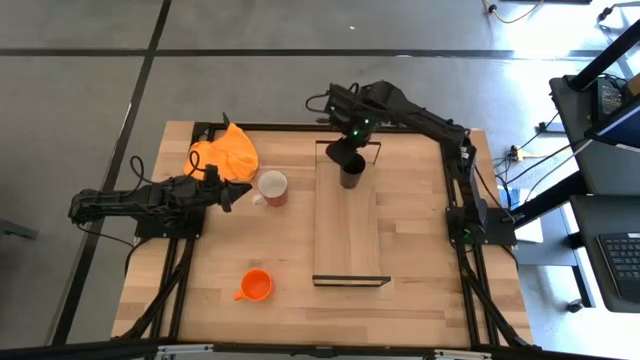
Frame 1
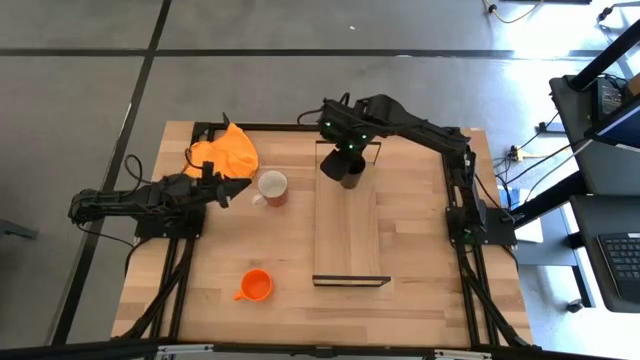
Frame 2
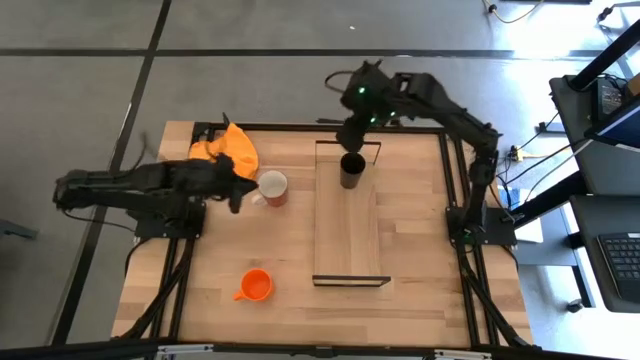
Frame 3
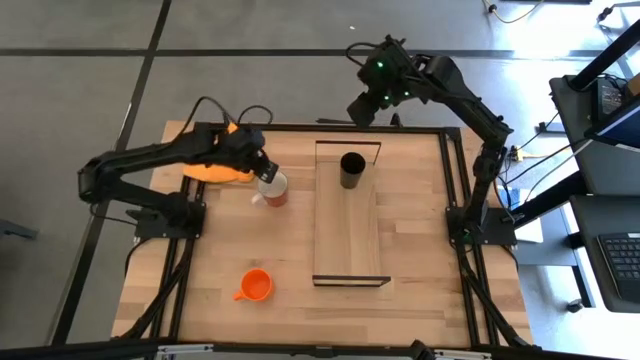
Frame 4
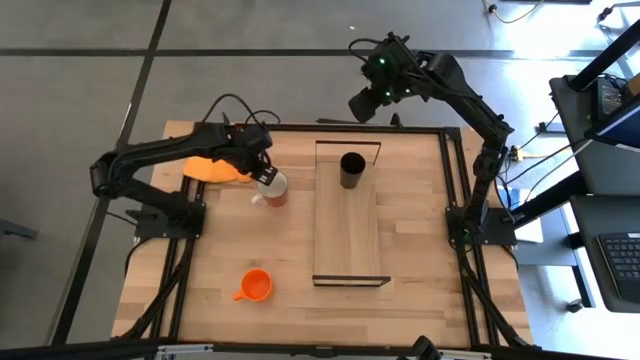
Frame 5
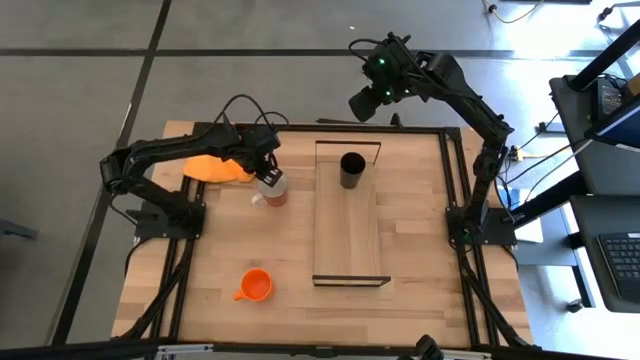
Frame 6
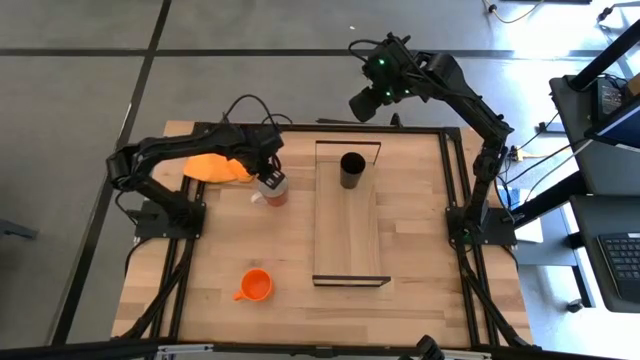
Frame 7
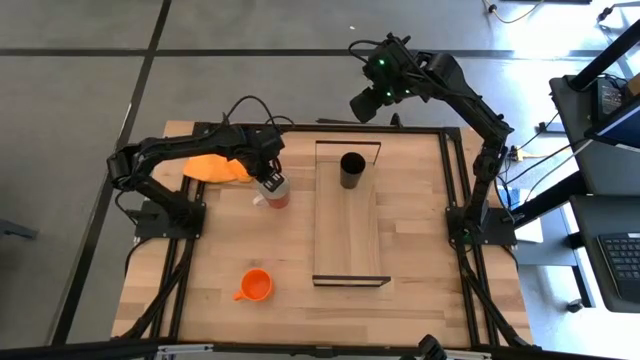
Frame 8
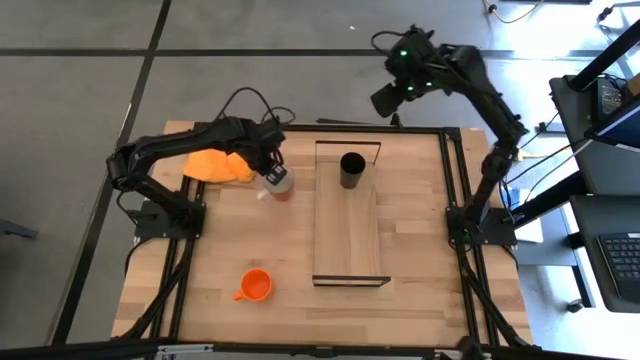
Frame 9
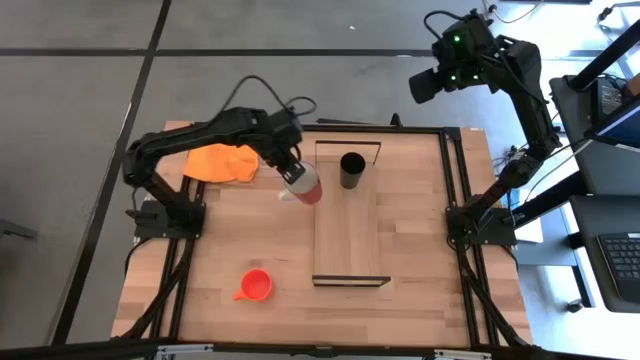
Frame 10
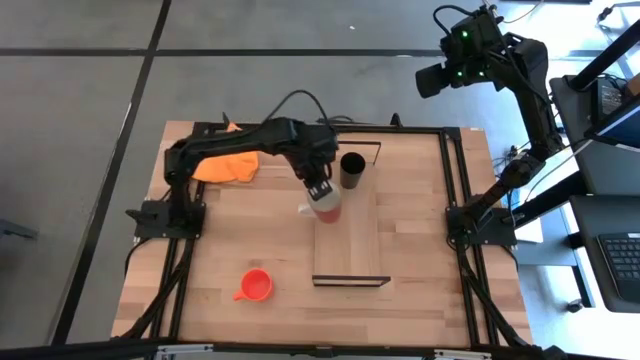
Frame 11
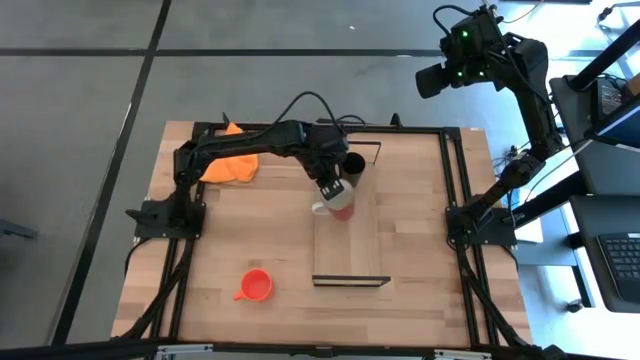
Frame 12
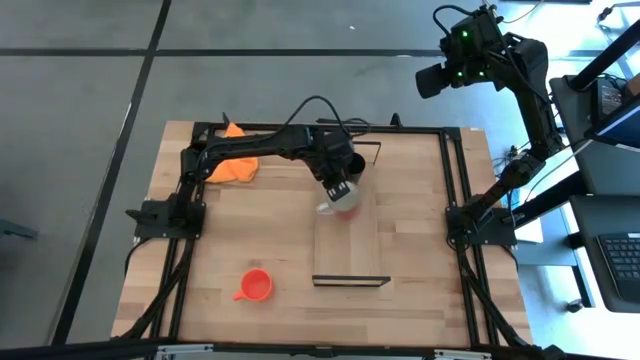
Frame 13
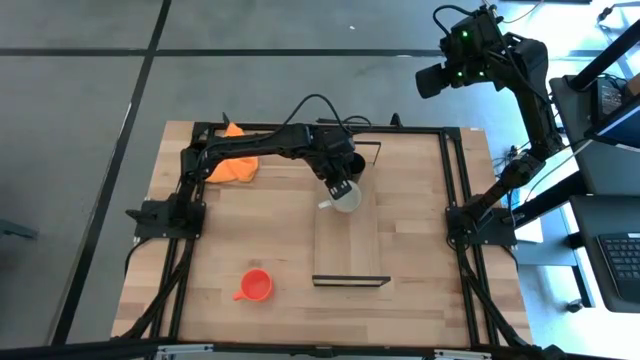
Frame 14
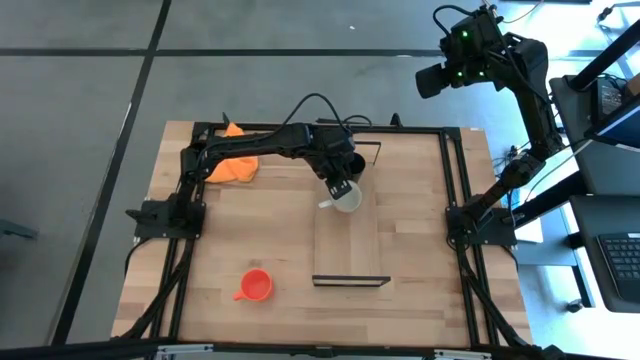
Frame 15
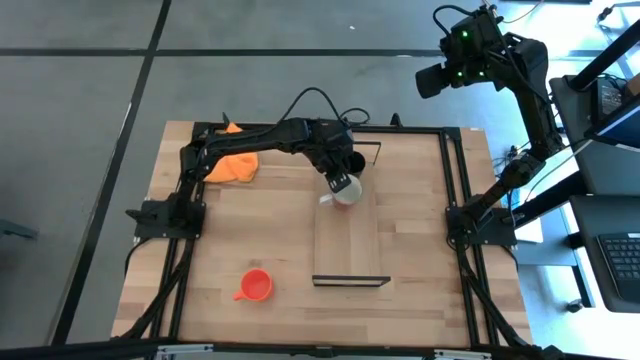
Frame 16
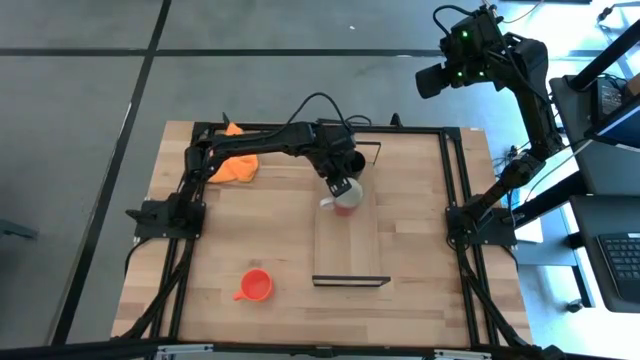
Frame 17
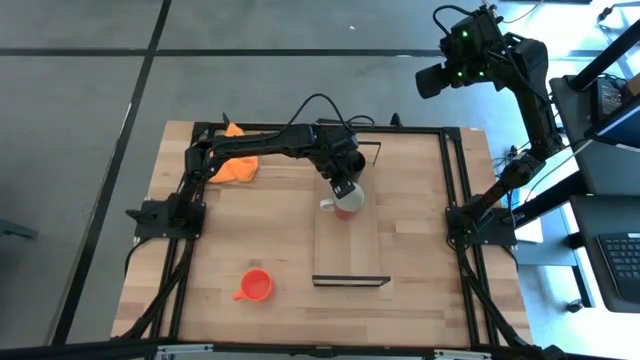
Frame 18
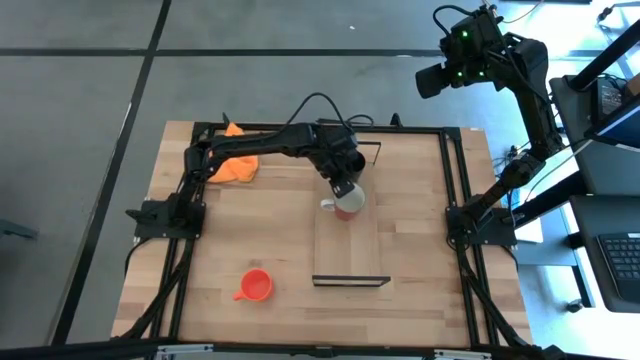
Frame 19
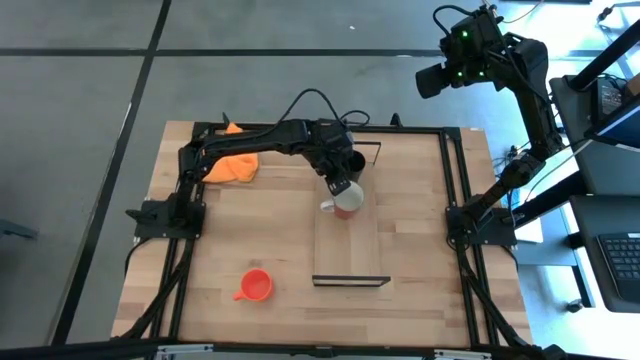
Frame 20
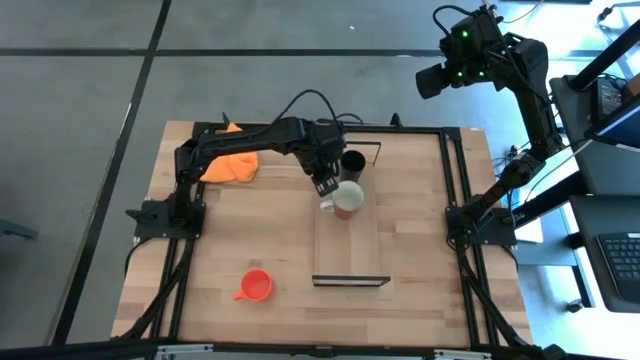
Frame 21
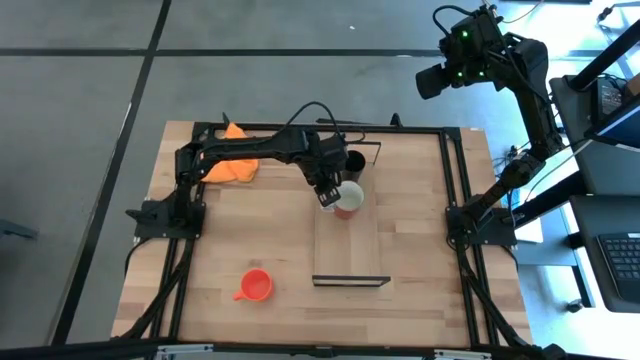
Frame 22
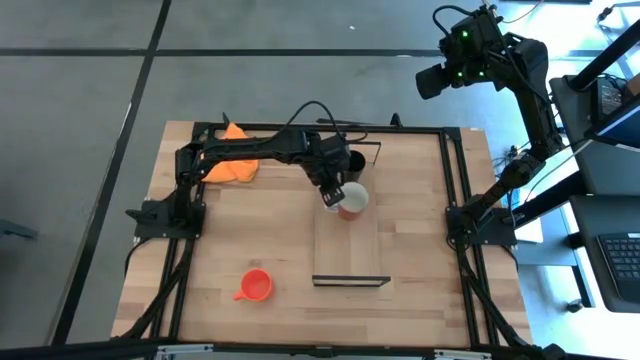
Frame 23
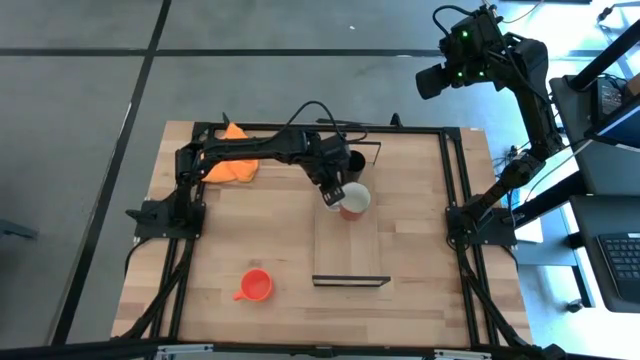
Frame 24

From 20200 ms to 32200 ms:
Task: Stack small to large cups/mugs on shelf
Put the brown mug on the shelf

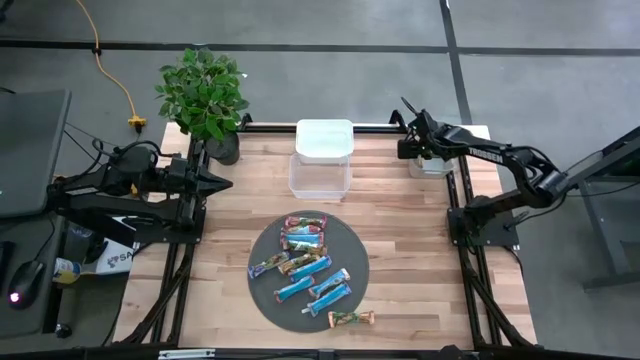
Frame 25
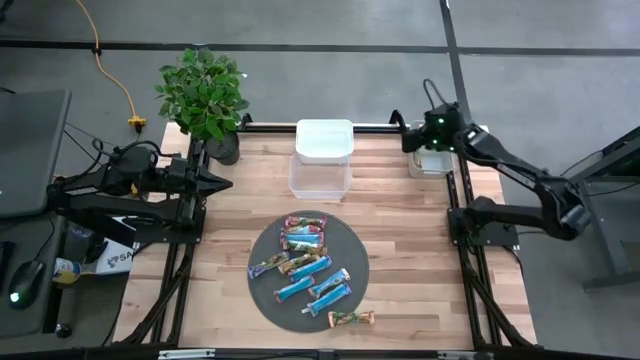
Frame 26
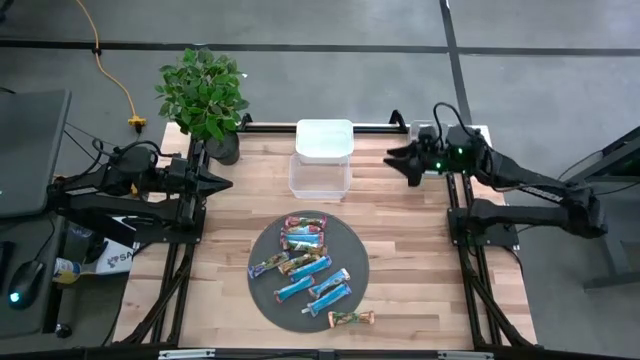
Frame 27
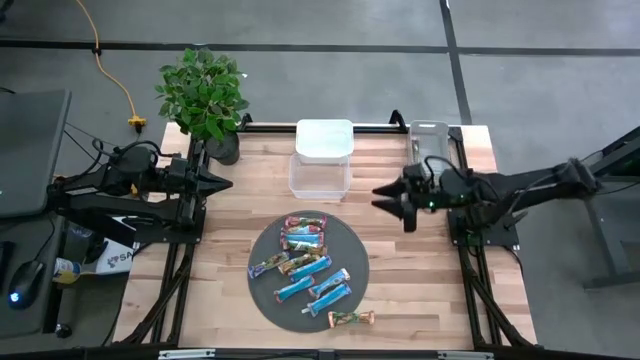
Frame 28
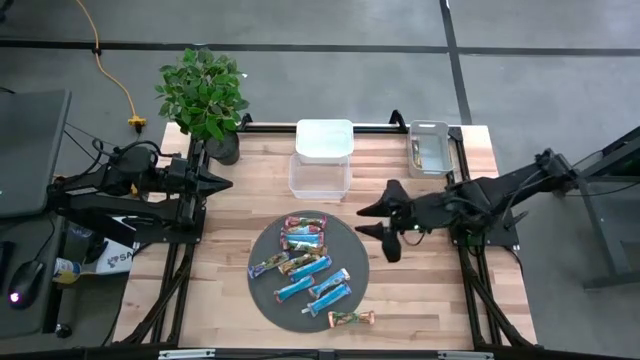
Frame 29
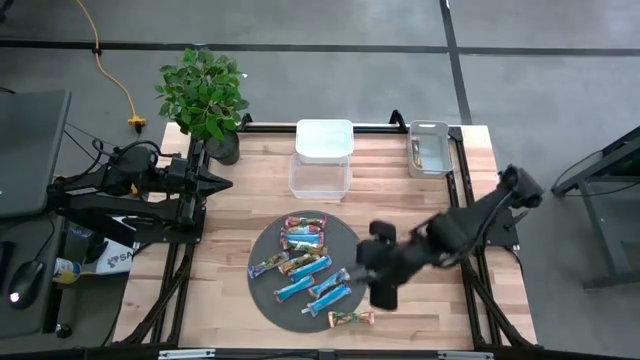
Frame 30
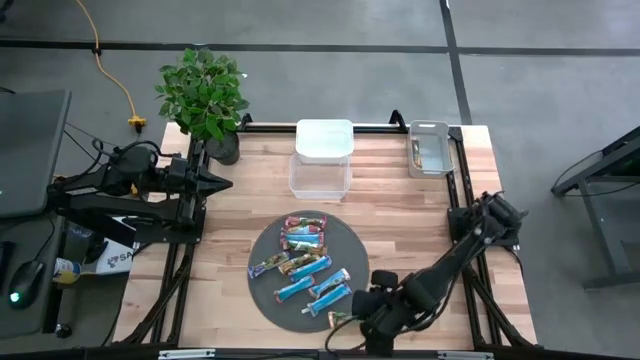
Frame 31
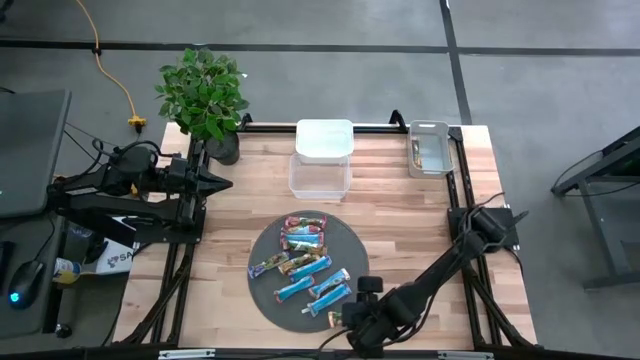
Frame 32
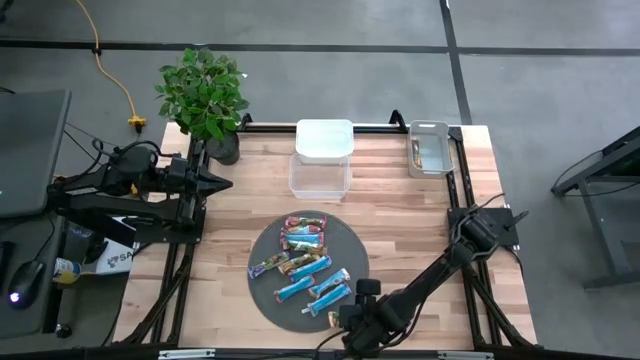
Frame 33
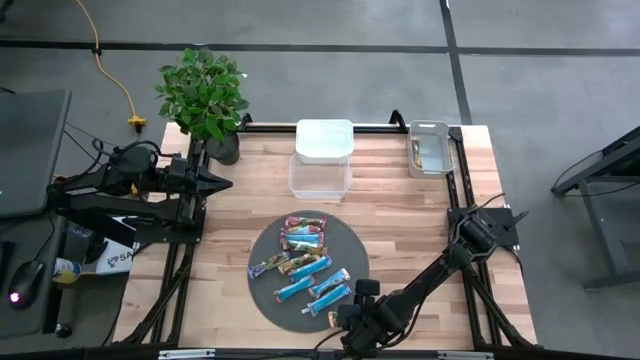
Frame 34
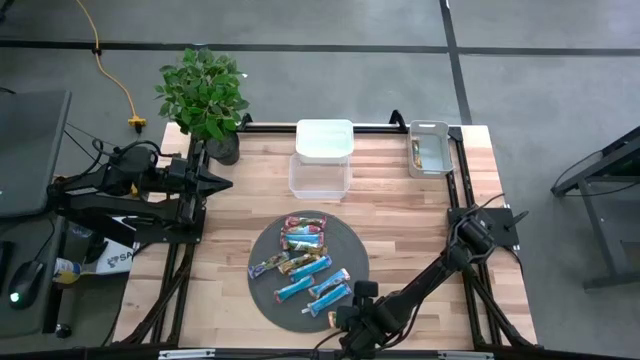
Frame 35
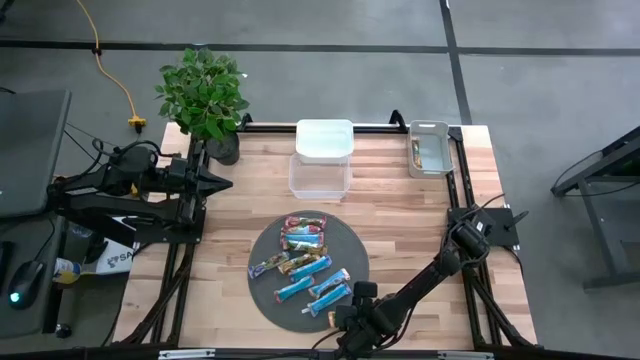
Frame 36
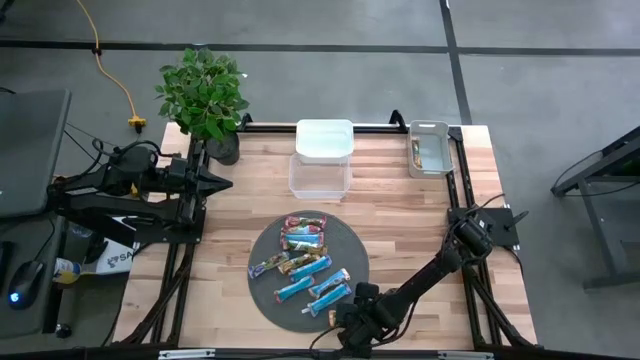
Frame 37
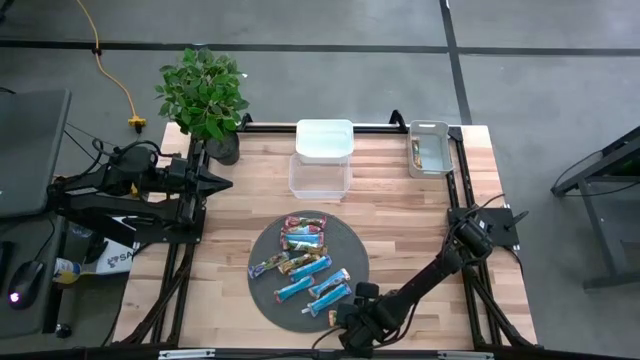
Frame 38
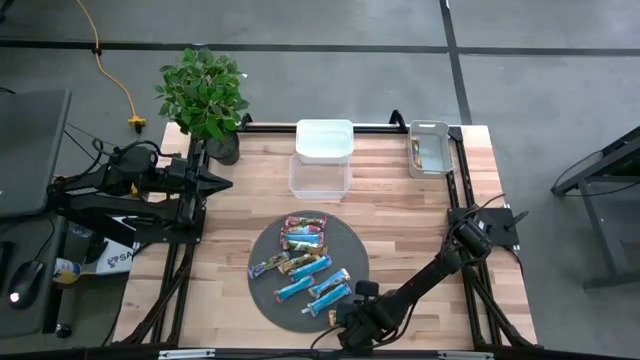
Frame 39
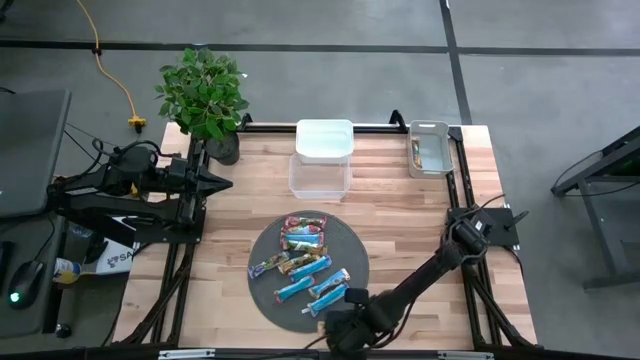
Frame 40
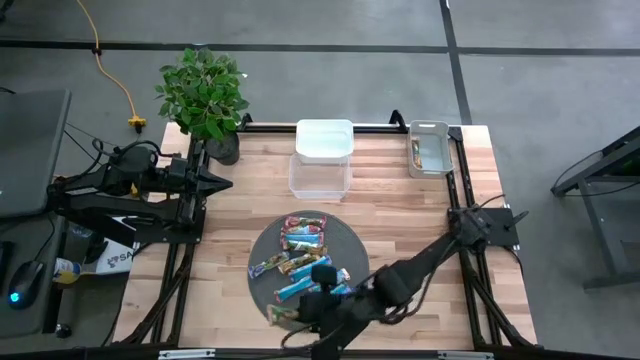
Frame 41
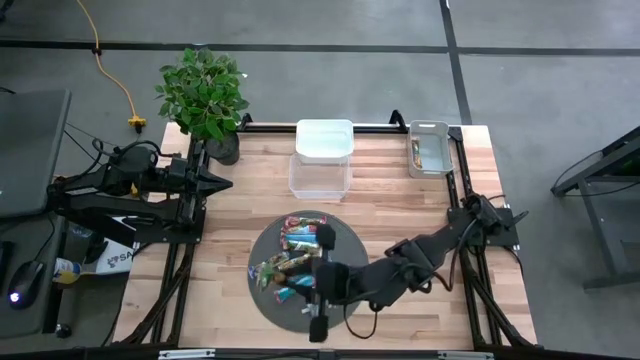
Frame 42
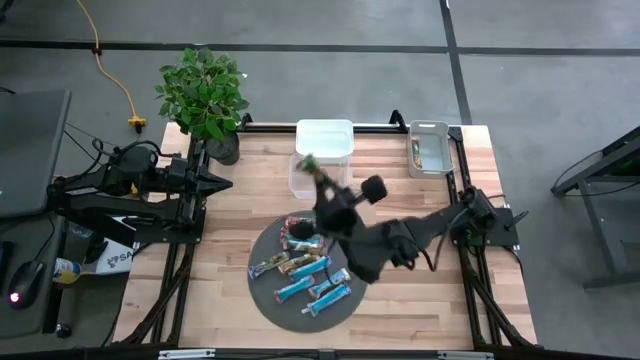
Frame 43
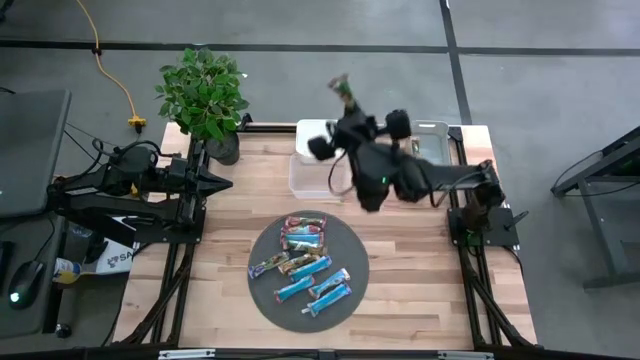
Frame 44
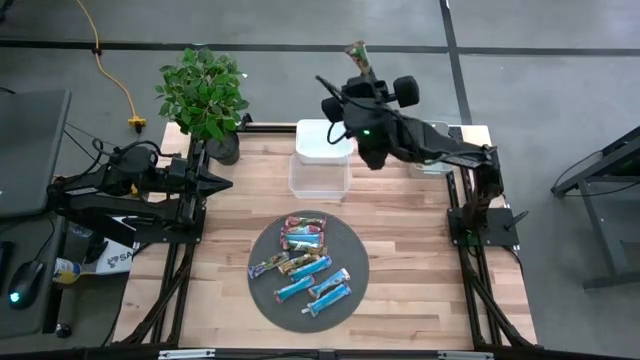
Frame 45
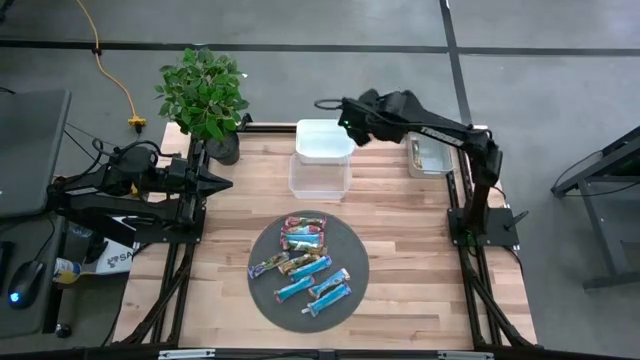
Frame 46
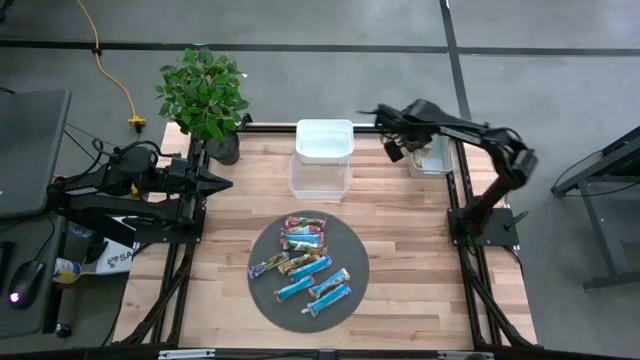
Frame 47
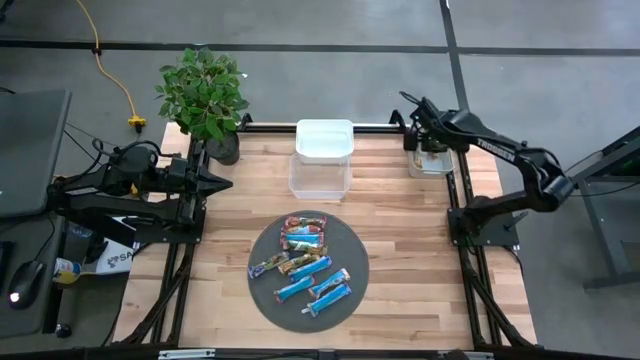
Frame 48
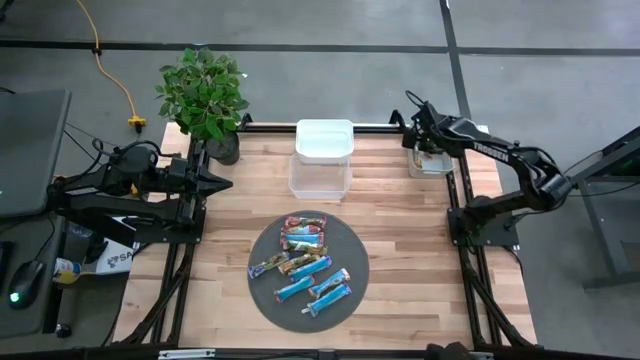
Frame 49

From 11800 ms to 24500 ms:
Task: Pick and place Granola Bars by type
Put the yellow granola bar into the gray bin
